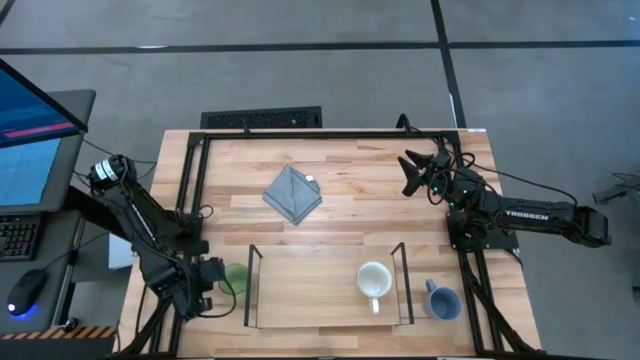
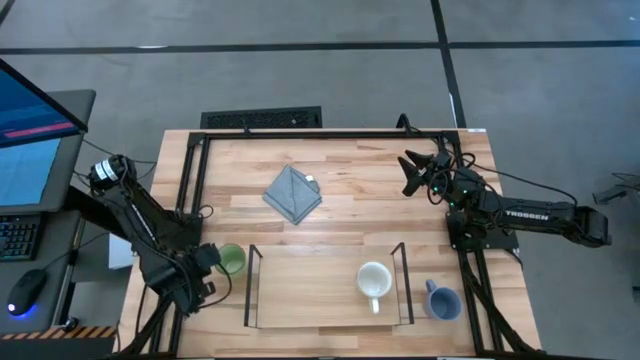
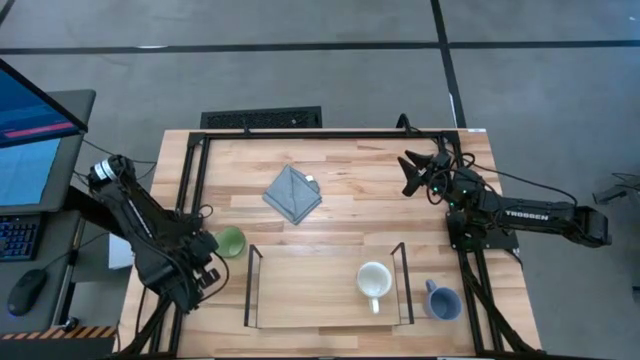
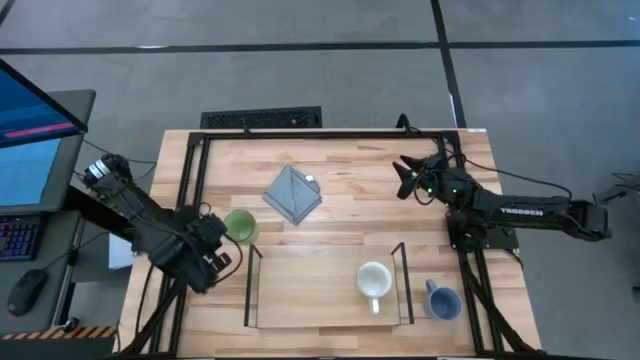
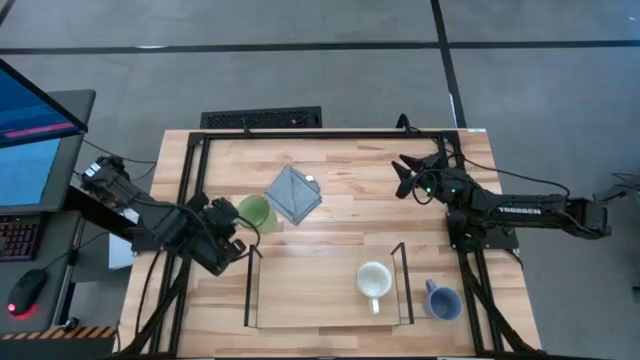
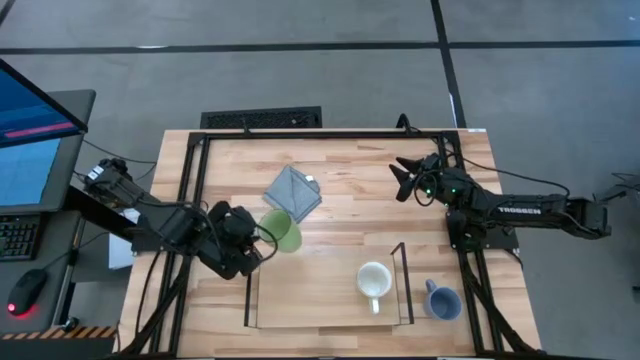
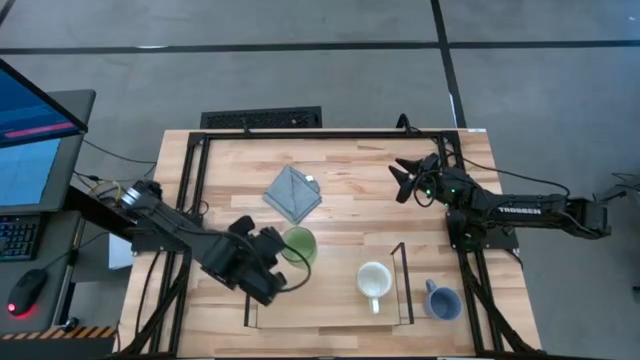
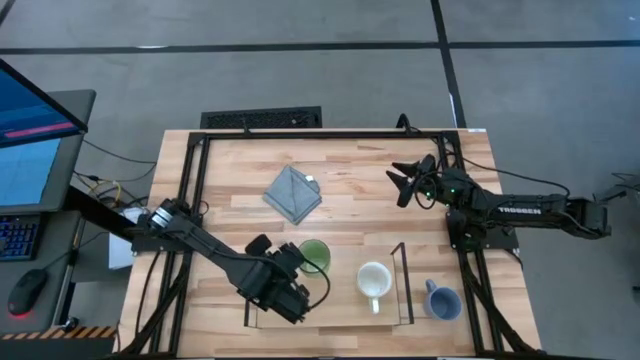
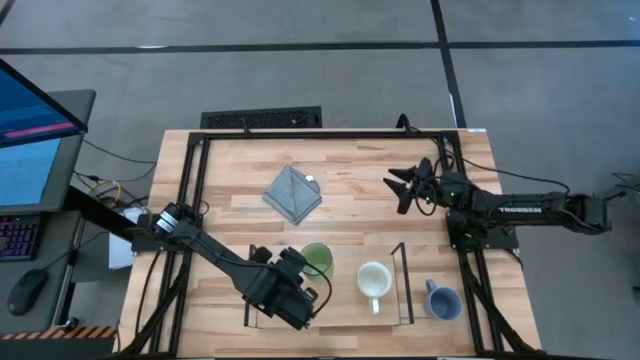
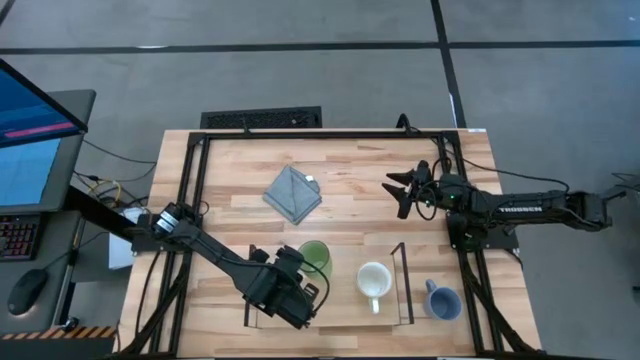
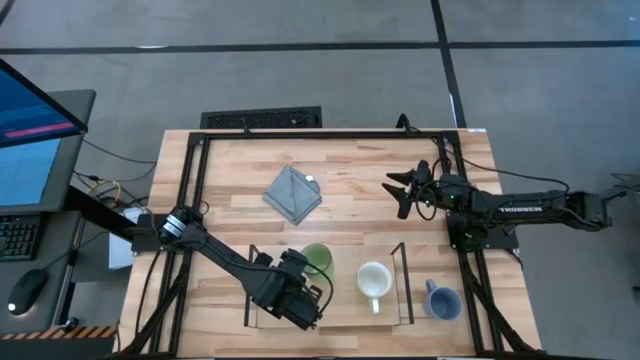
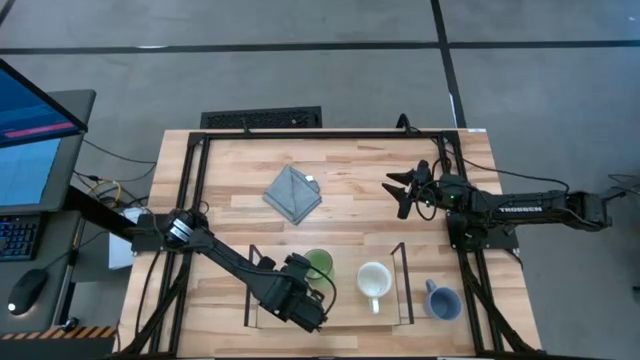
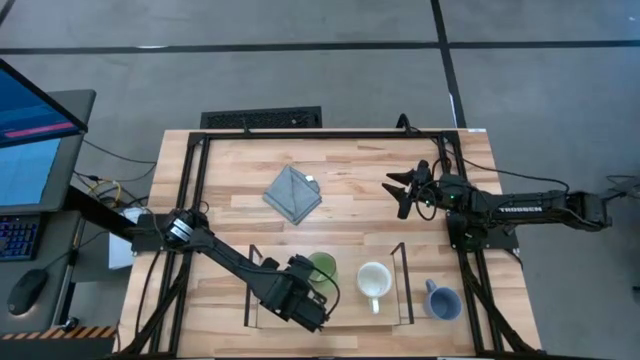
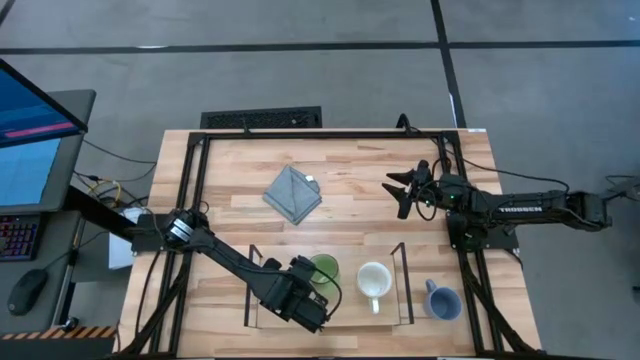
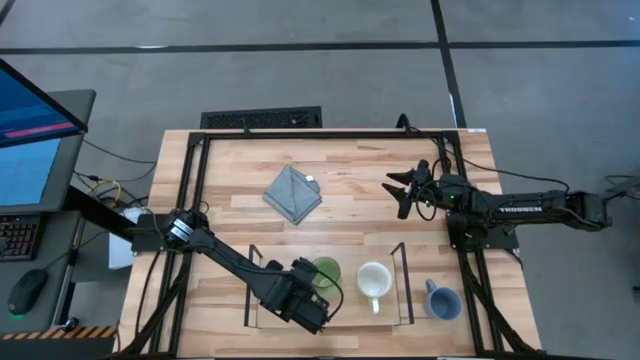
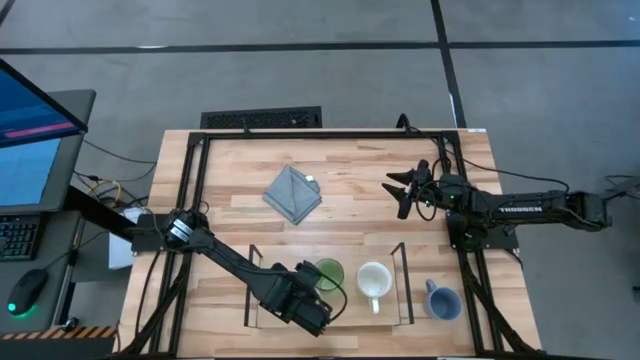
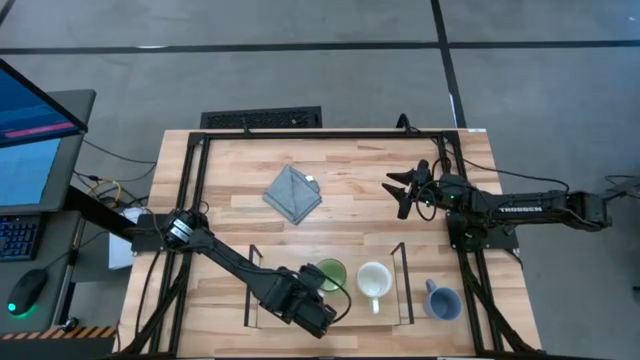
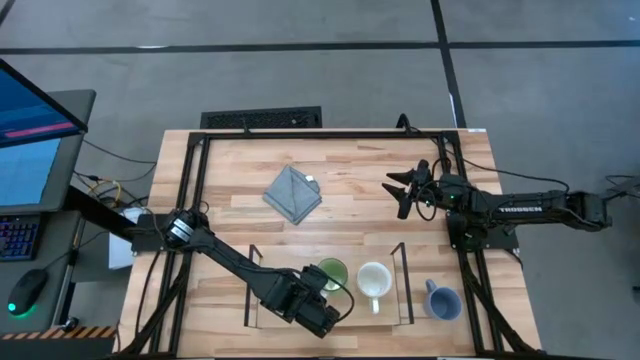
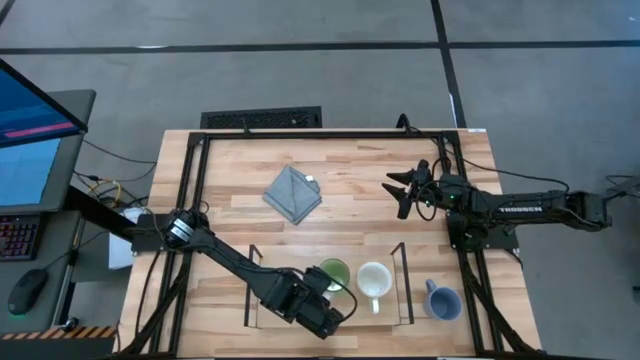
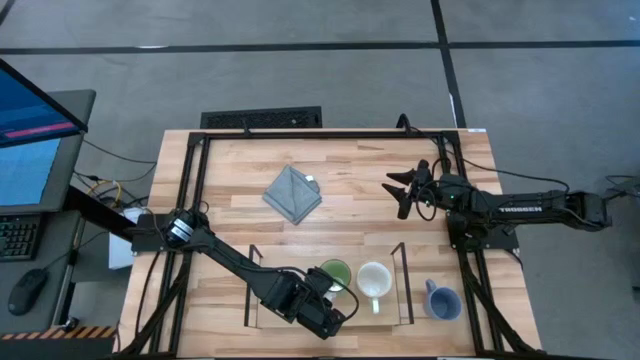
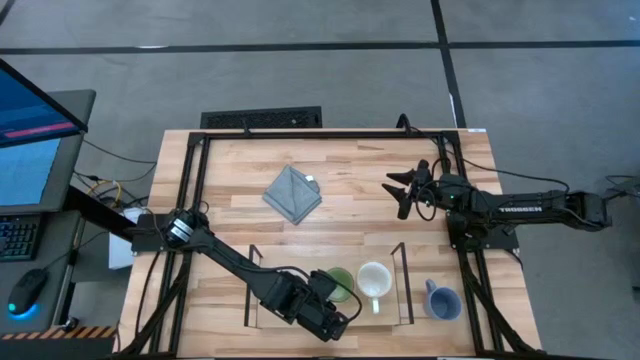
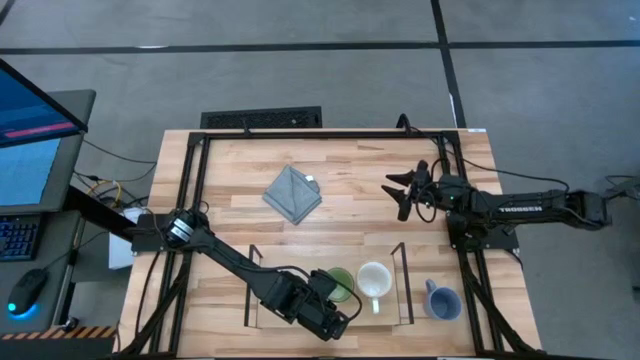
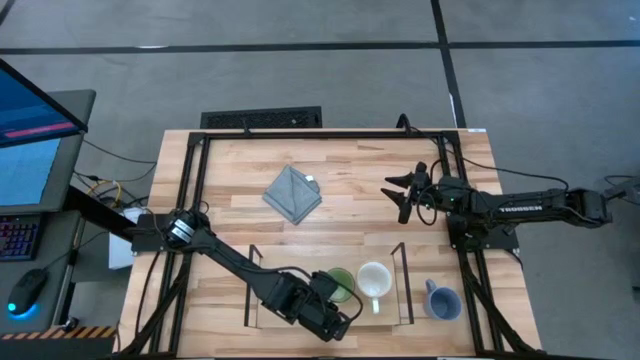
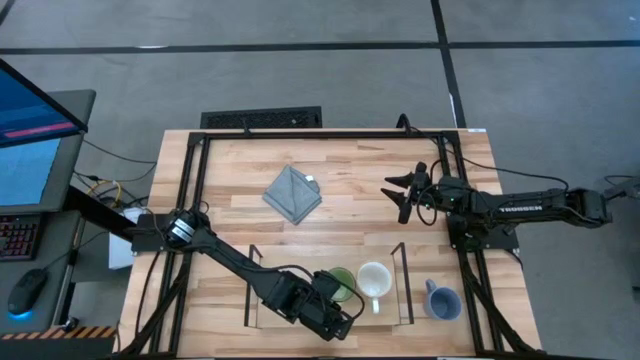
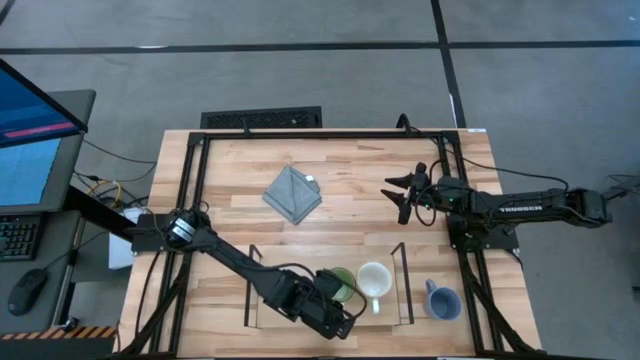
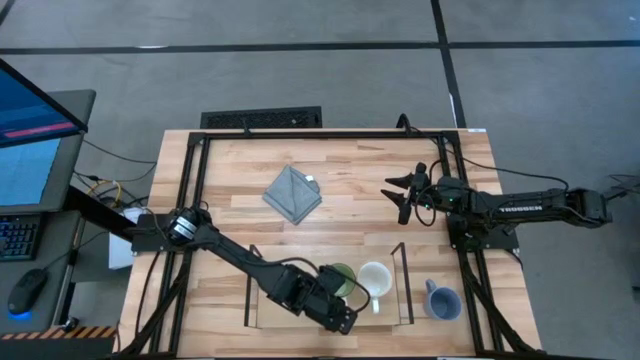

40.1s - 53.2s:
Task: Stack small to large cups/mugs on shelf
Put the green mug on the shelf

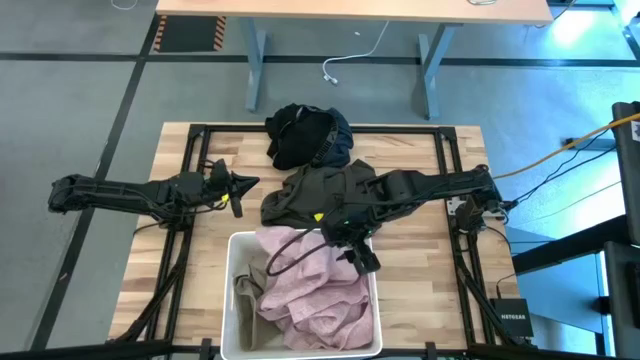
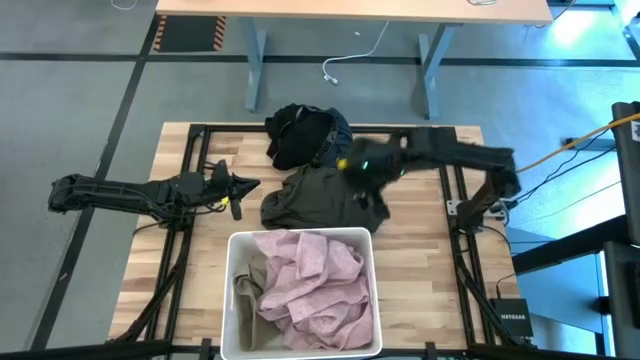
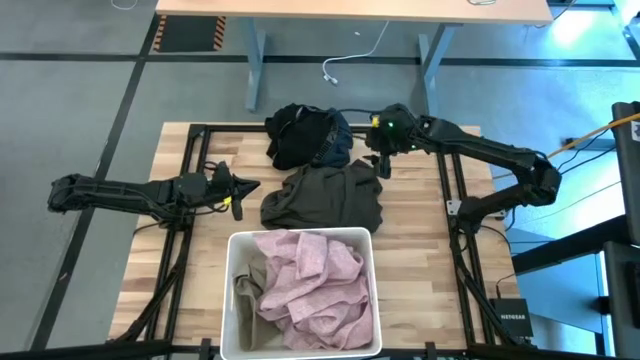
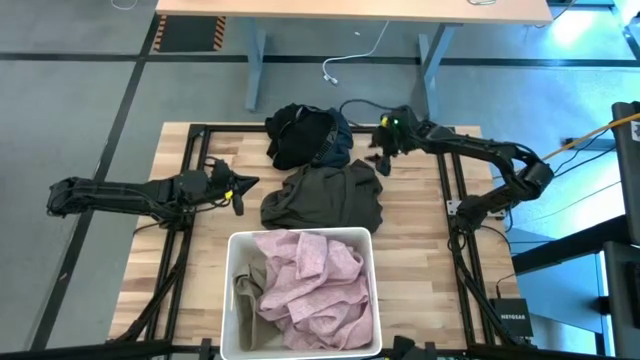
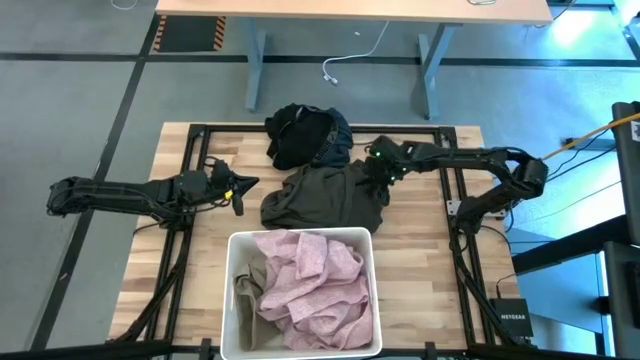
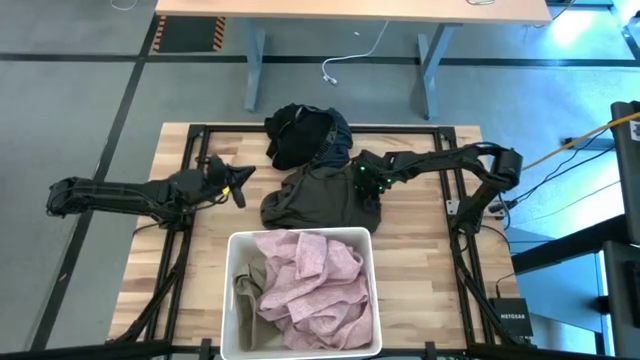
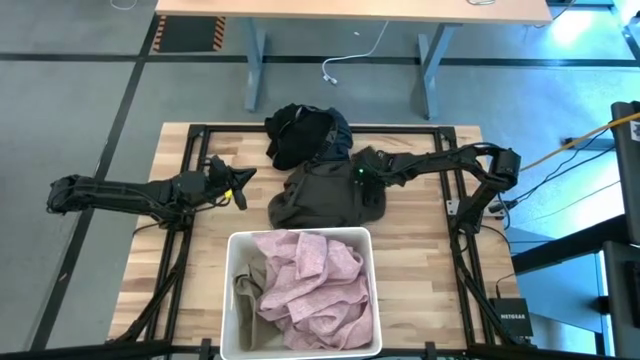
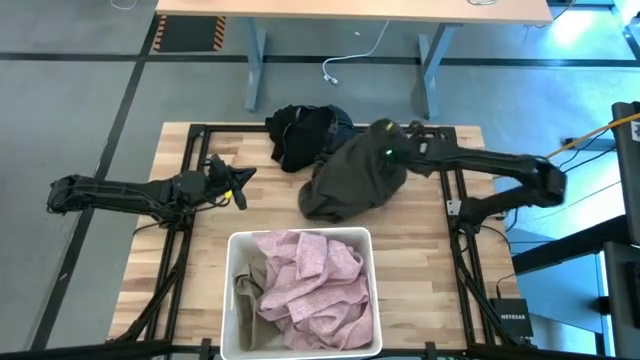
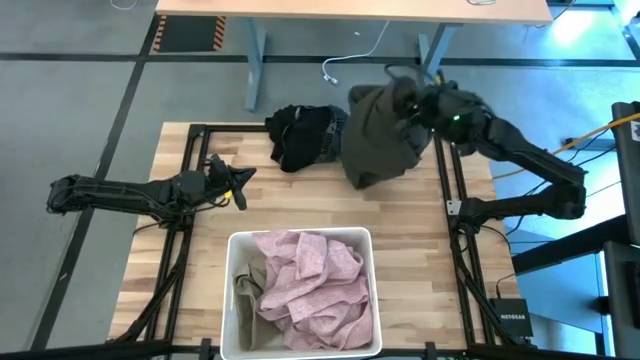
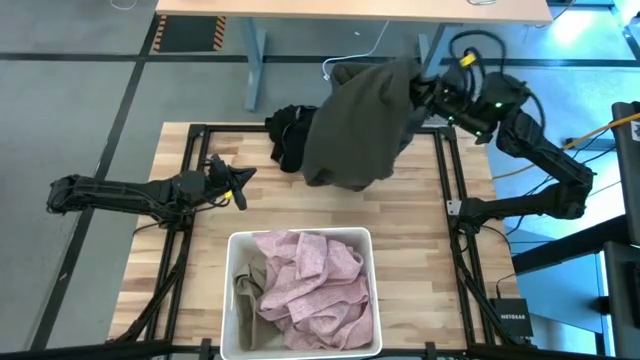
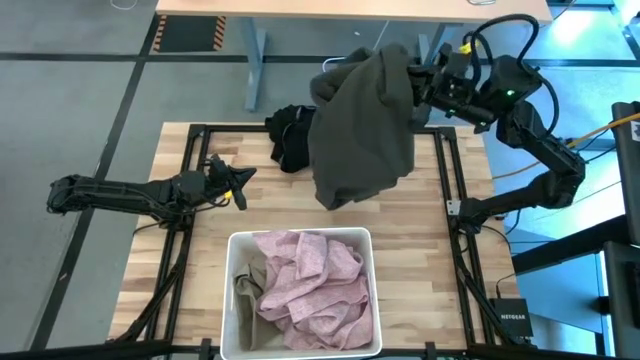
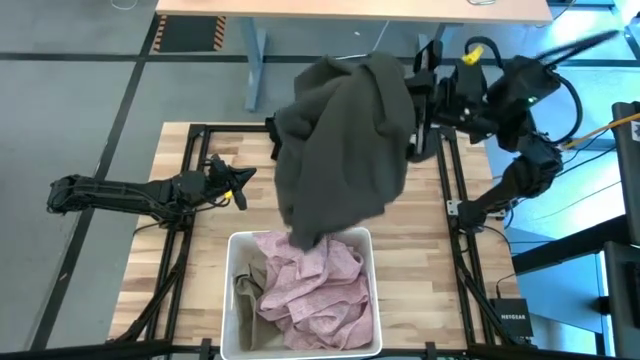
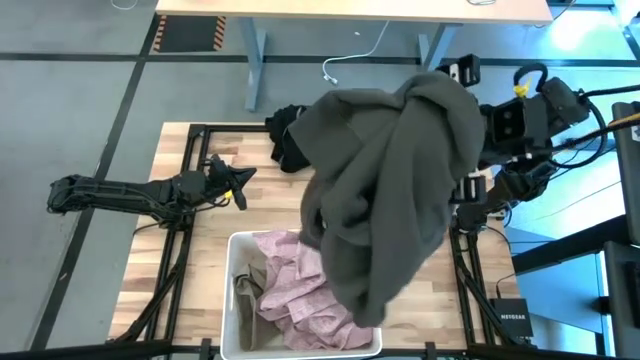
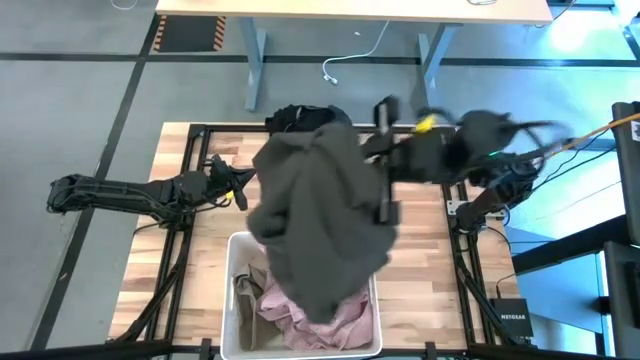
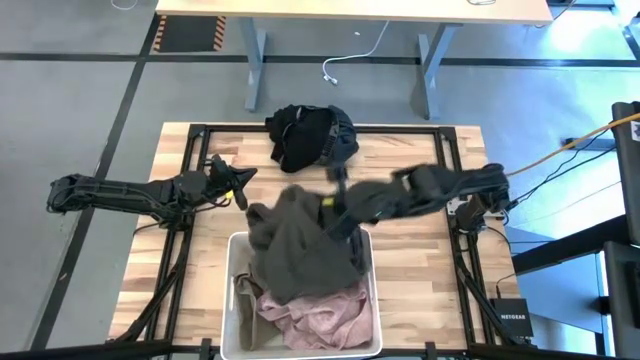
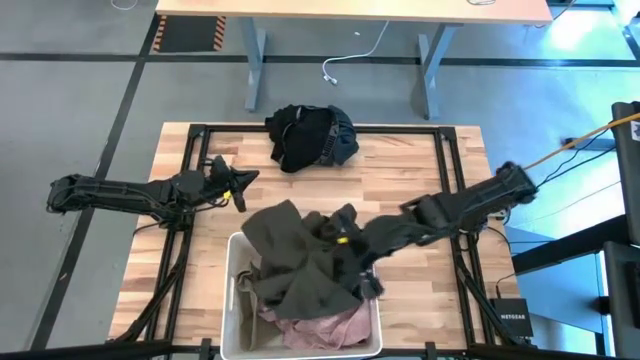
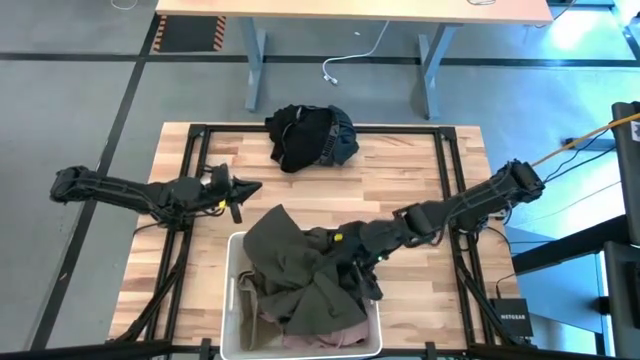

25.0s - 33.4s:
Task: Sort clothes
Put the green hoodie into the white bin
